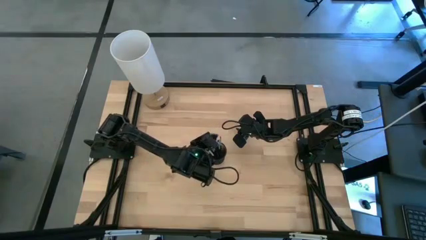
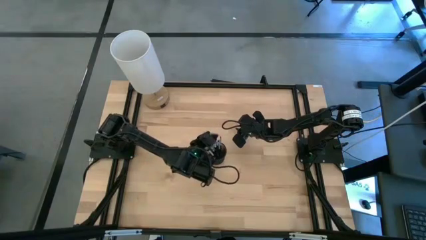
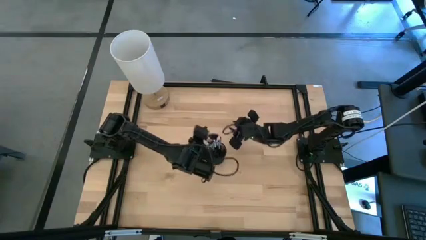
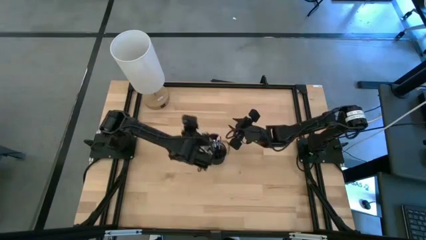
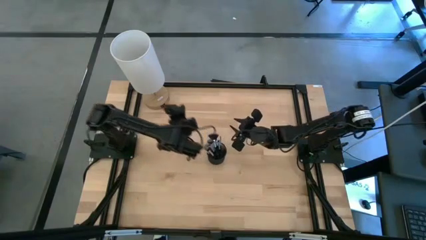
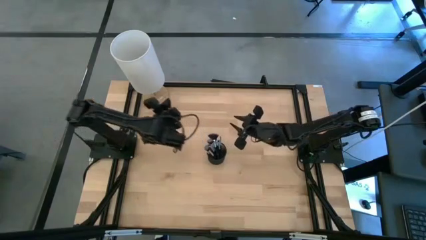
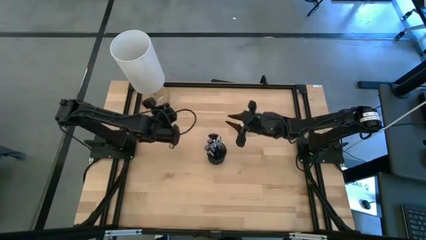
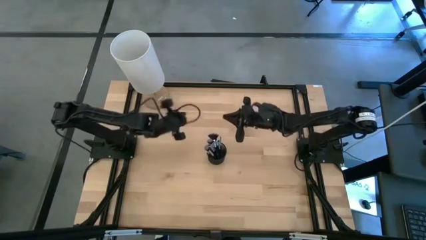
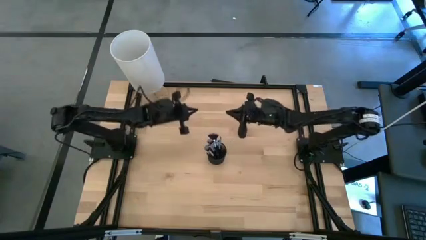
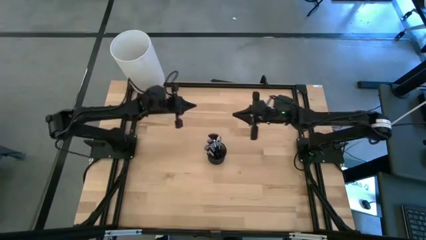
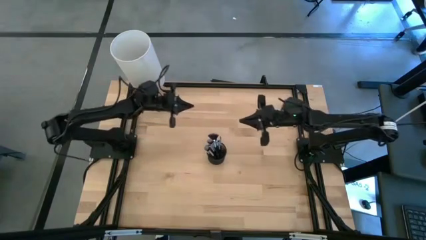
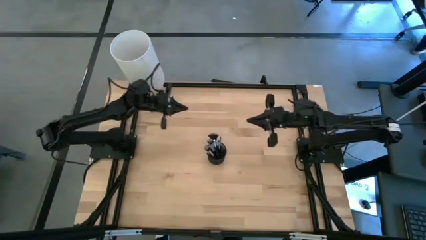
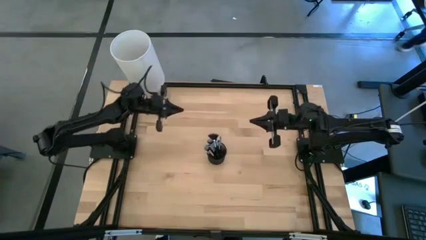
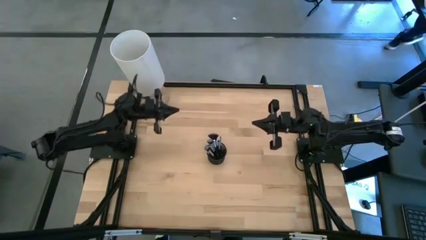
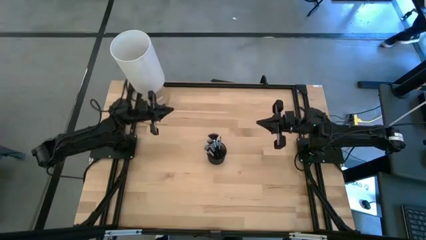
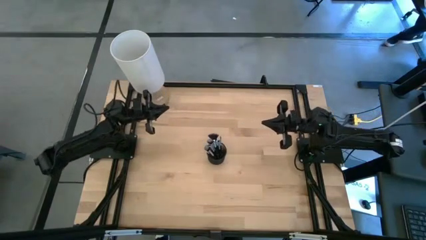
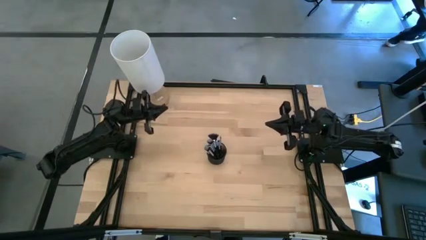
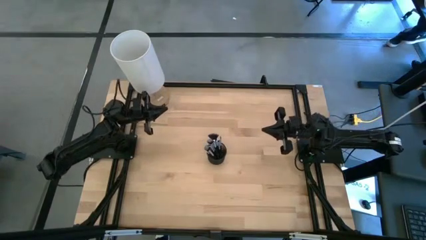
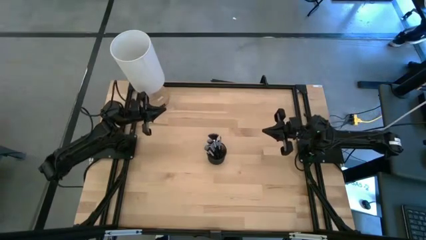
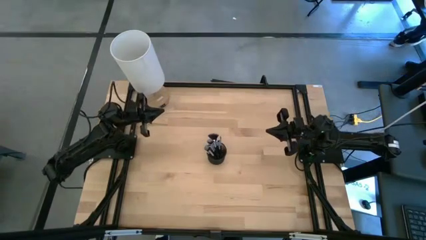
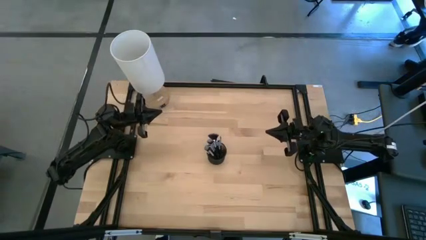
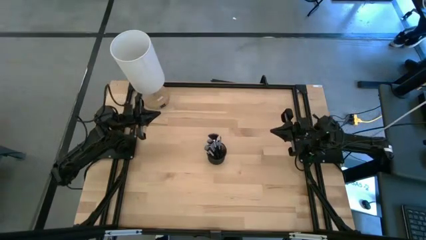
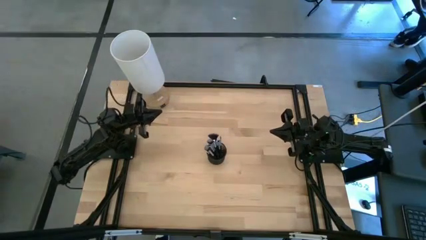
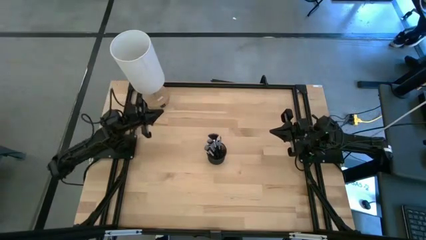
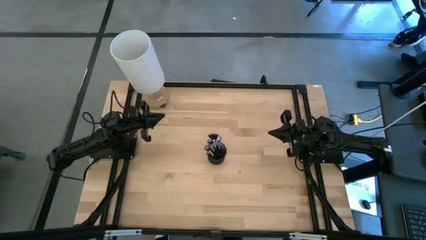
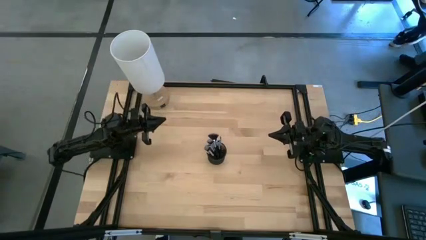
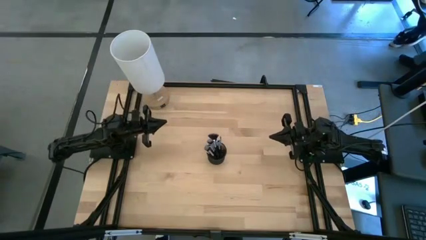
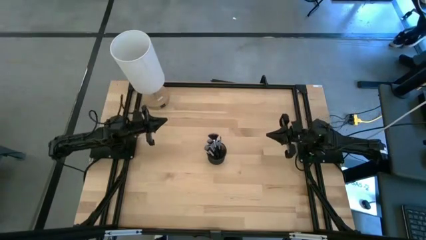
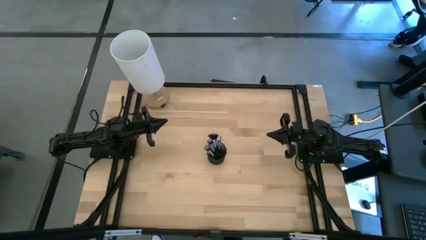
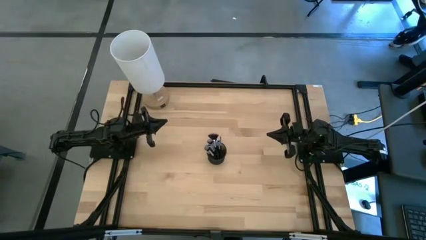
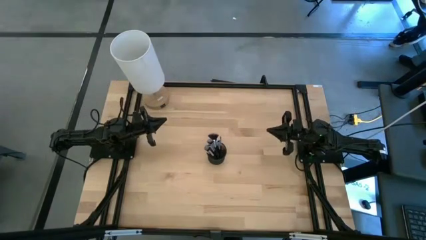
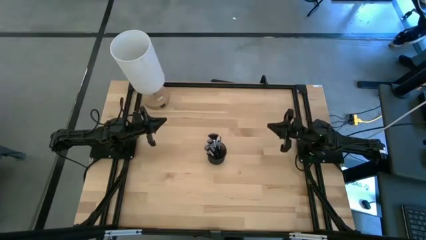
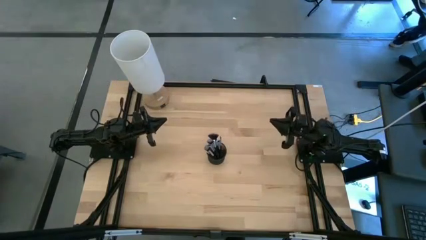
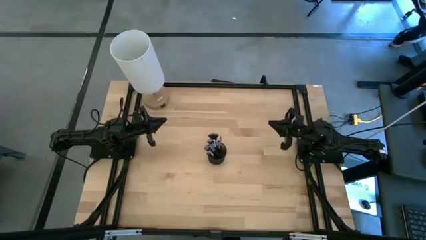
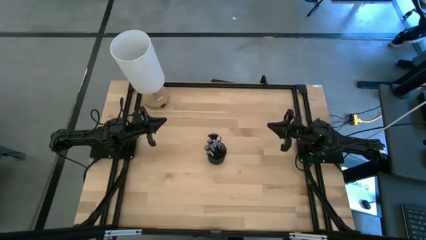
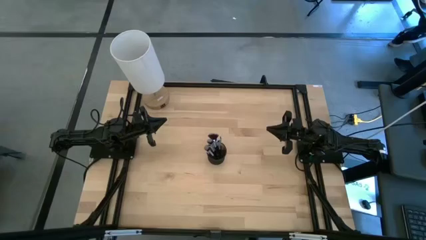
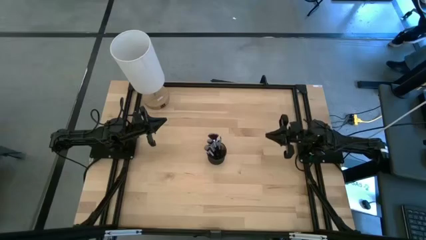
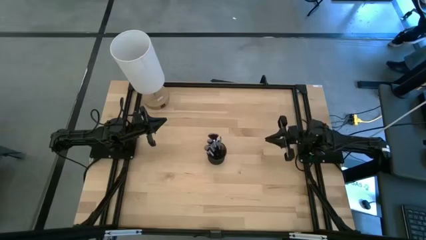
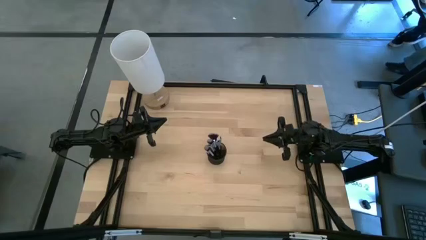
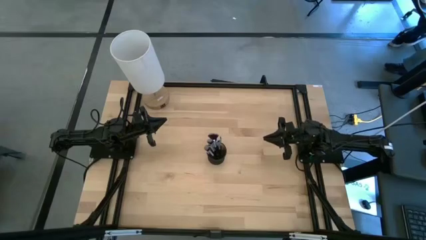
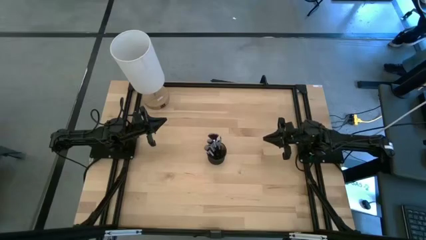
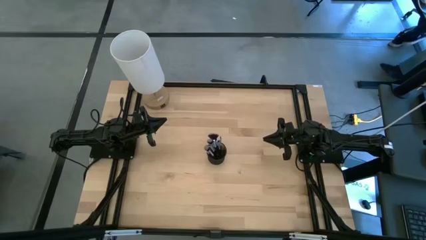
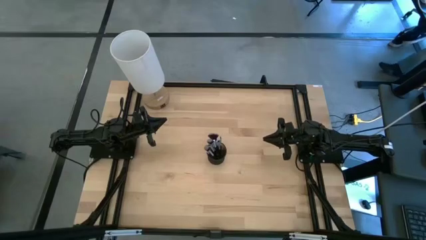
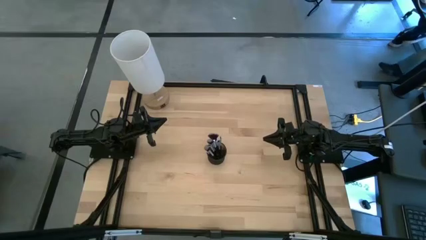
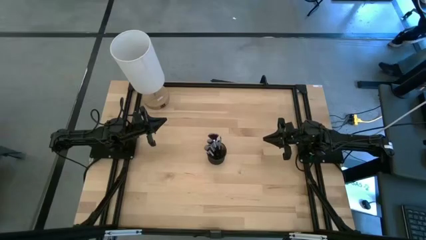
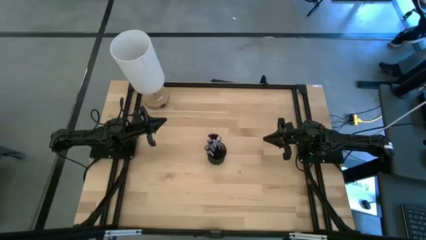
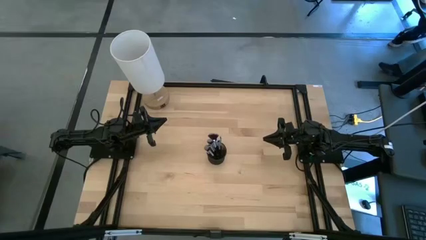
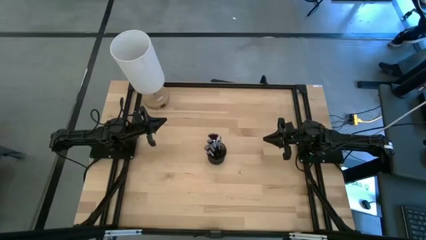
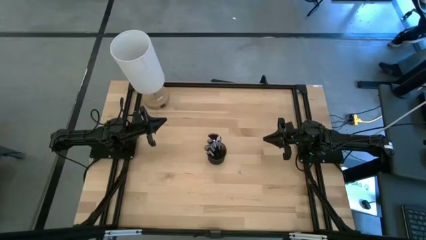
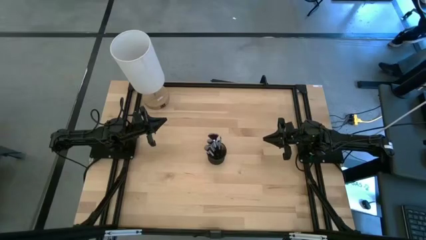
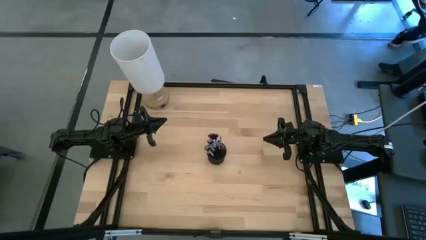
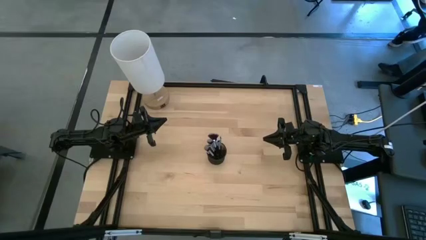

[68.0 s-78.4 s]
Task: Pick & Place Makeup Brushes
Return to home position

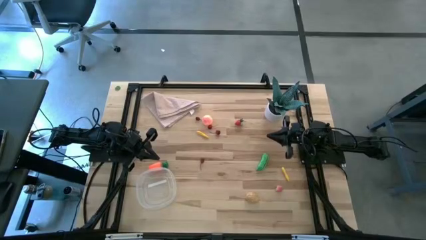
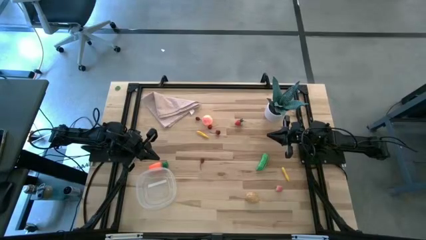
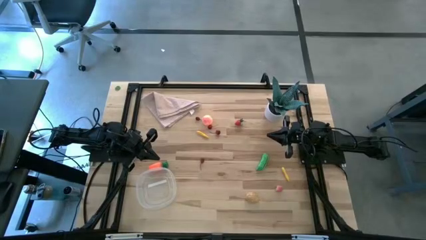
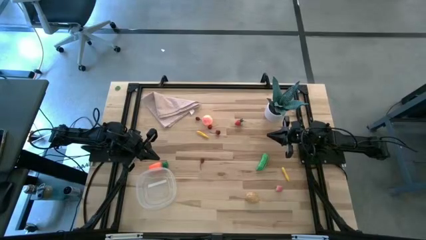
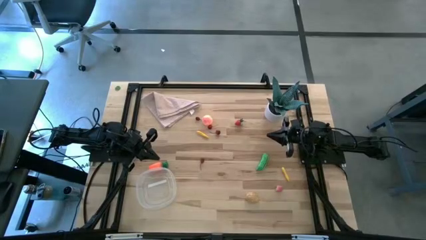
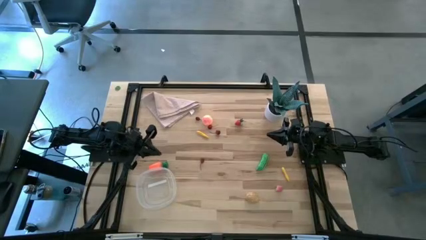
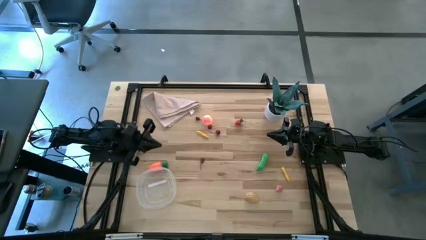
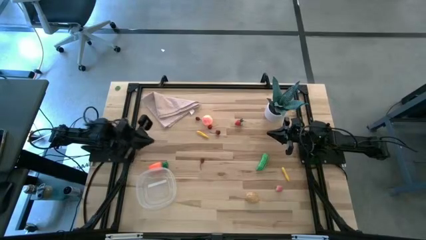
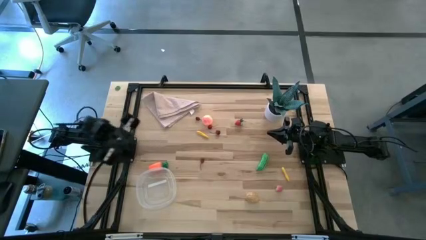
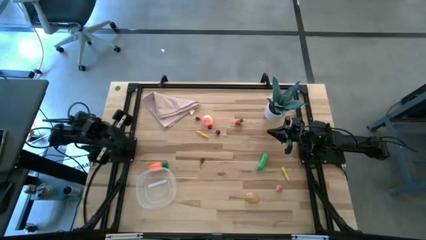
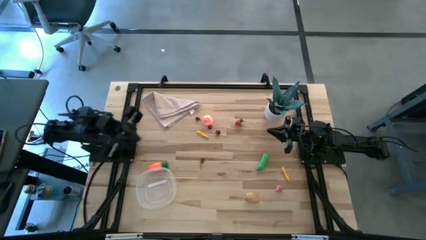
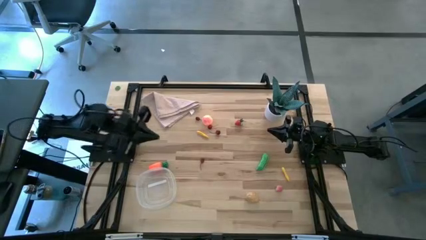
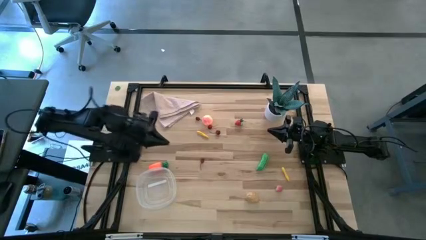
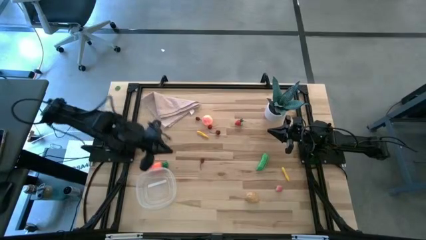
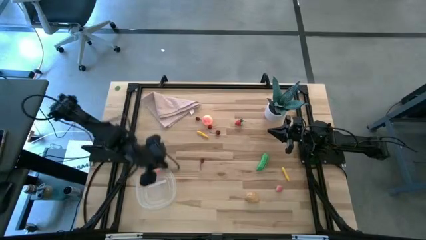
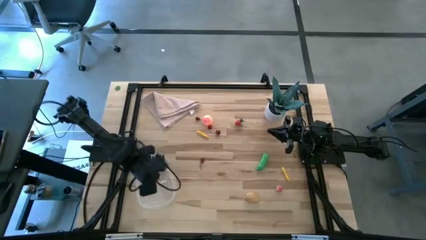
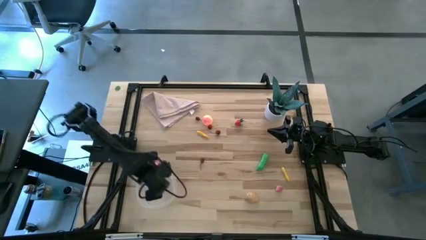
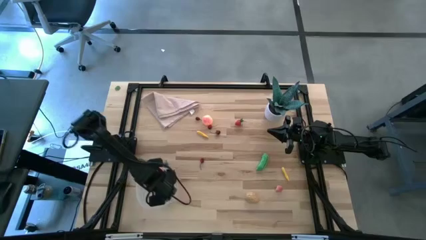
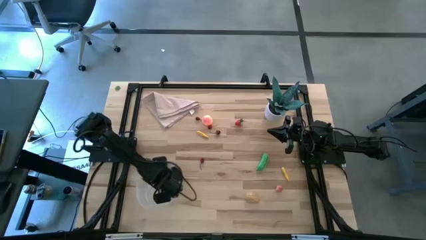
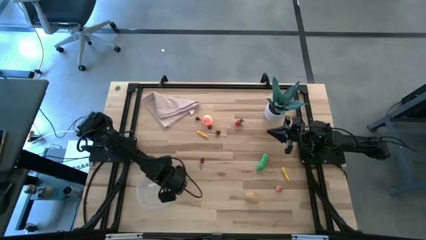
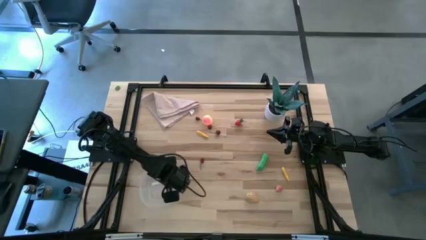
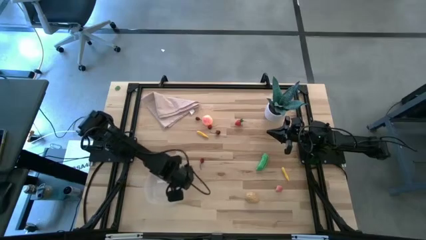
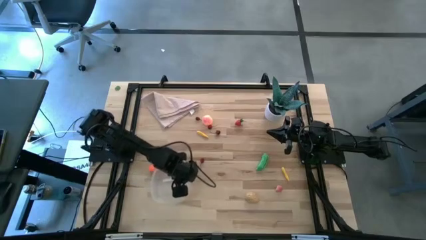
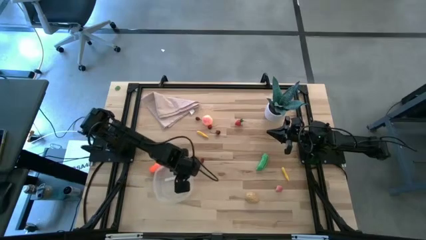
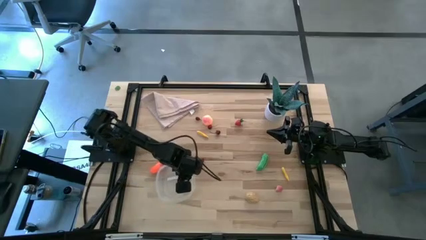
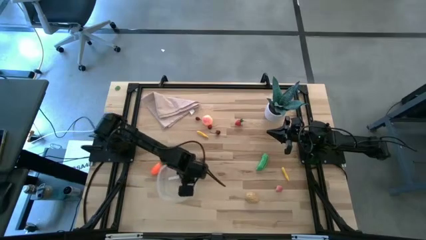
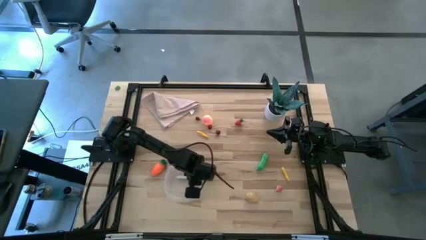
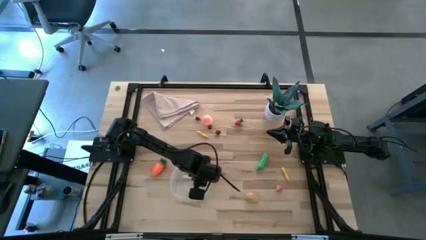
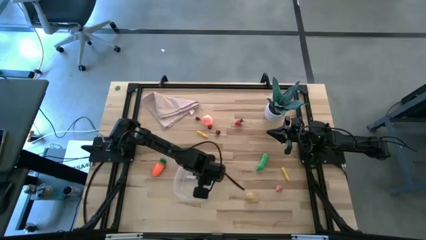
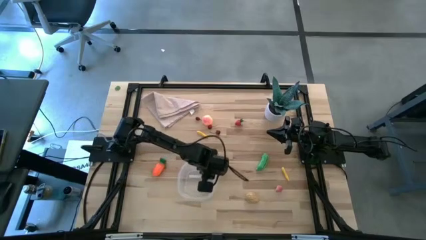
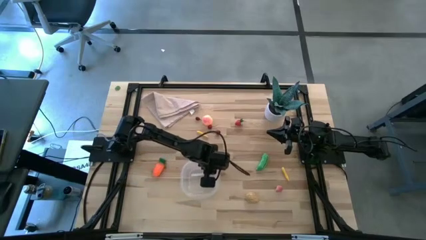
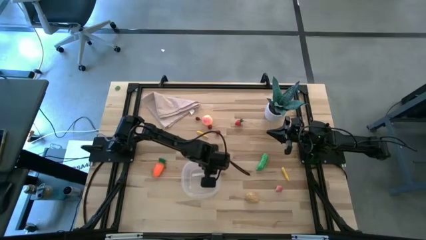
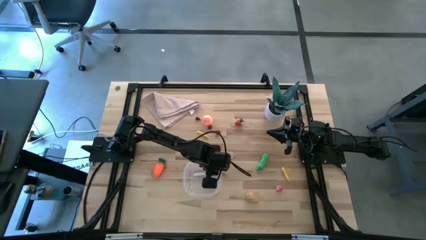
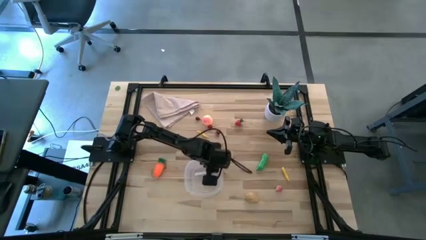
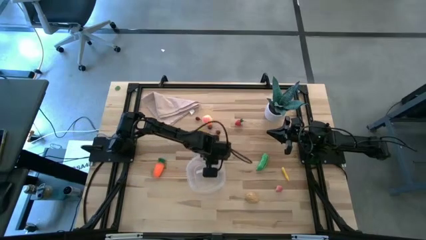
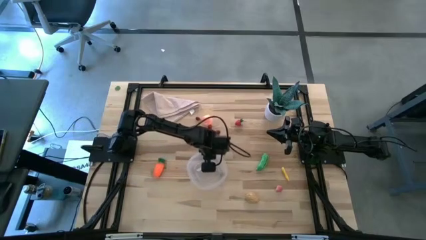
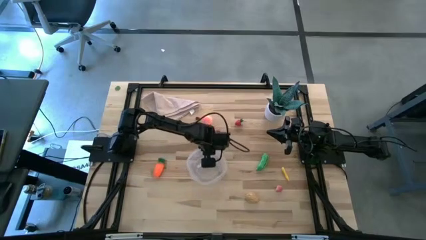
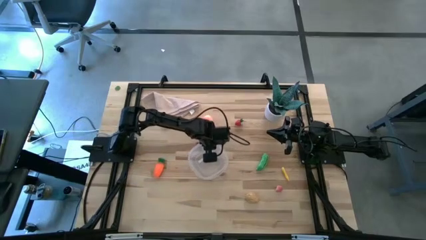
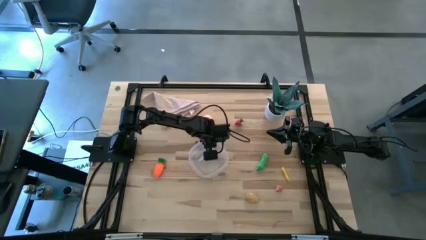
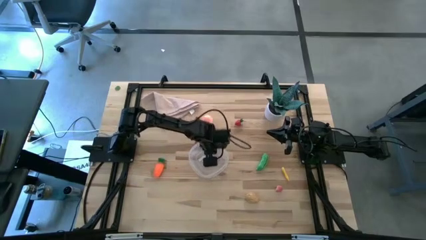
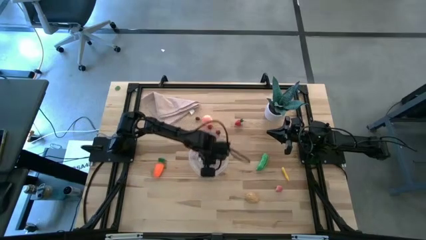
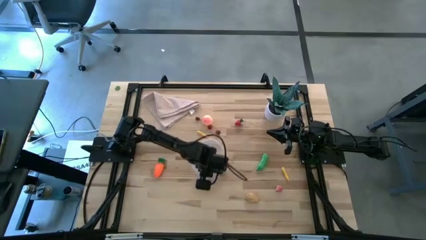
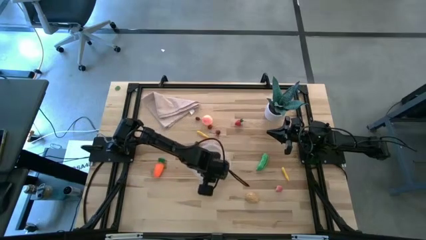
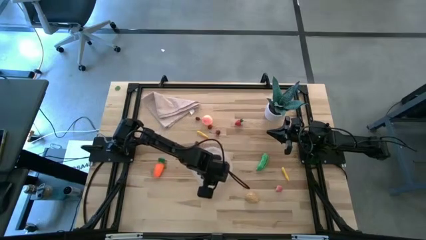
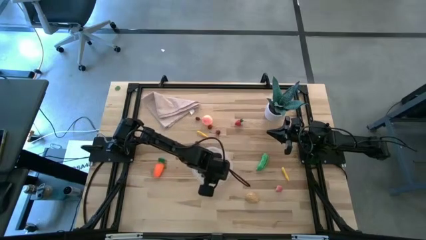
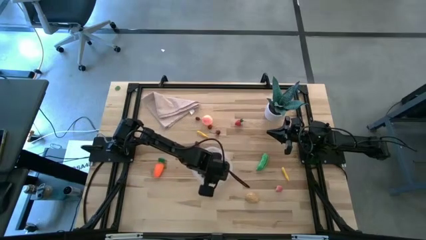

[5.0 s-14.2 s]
Task: Pick and placing Produce into tupperware
Move the transparent bin to the center of the table
